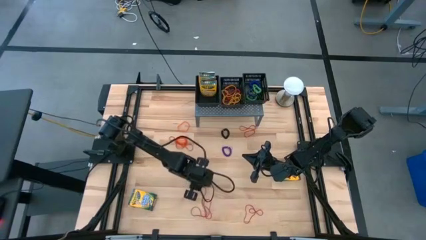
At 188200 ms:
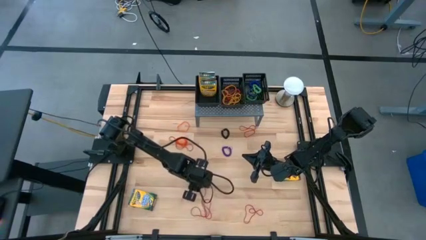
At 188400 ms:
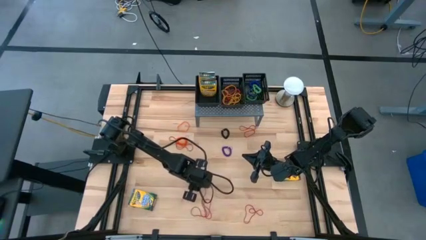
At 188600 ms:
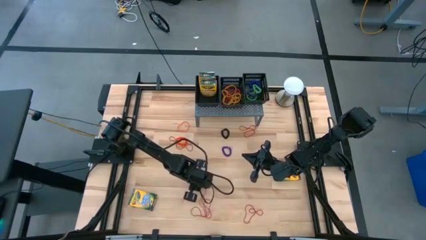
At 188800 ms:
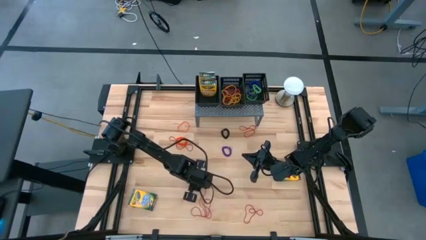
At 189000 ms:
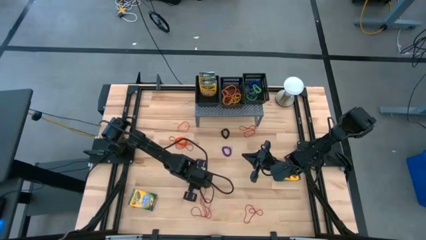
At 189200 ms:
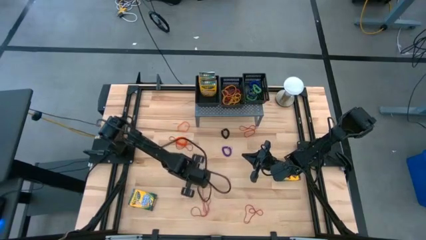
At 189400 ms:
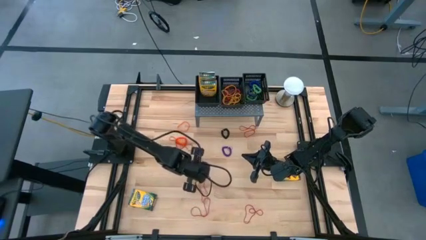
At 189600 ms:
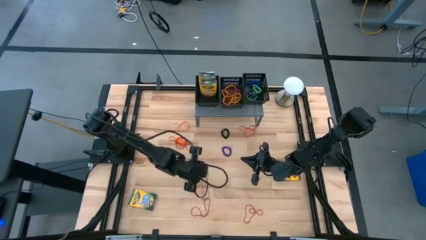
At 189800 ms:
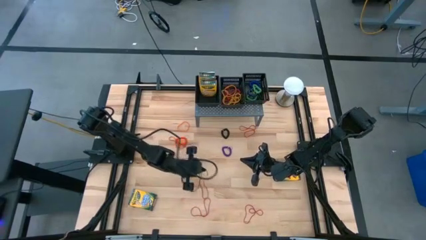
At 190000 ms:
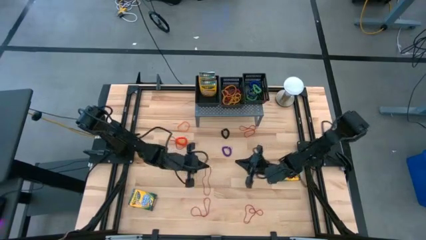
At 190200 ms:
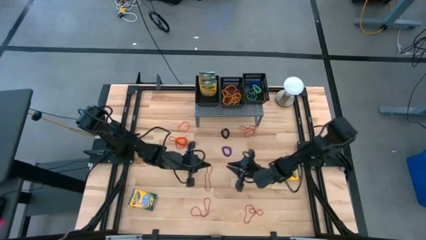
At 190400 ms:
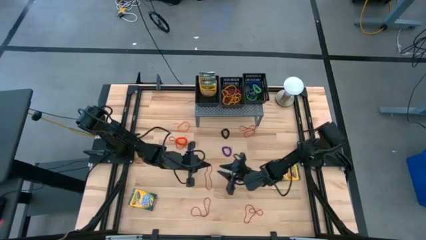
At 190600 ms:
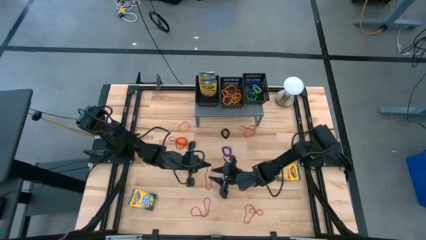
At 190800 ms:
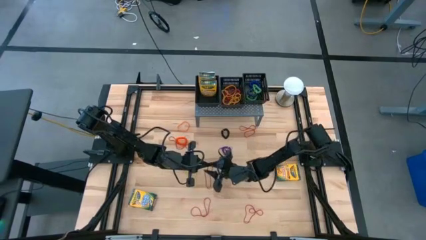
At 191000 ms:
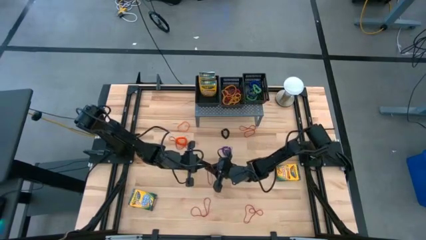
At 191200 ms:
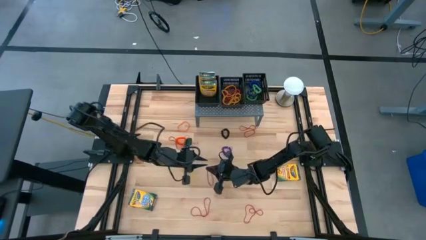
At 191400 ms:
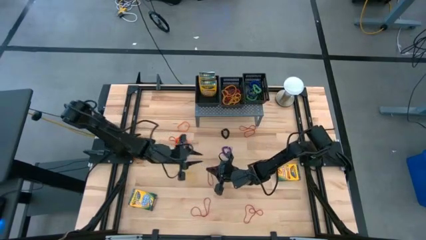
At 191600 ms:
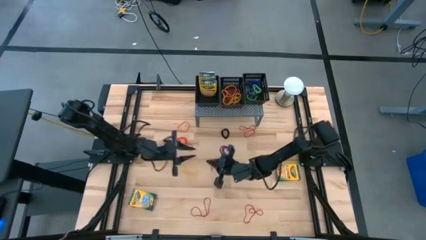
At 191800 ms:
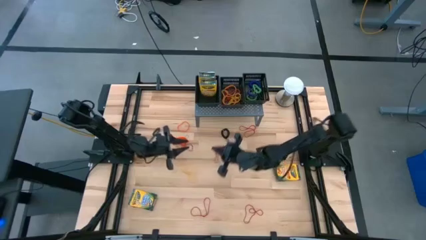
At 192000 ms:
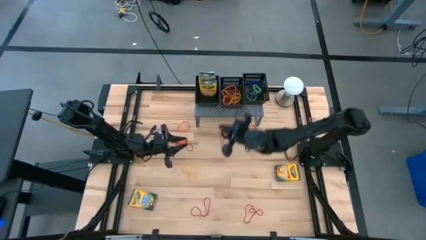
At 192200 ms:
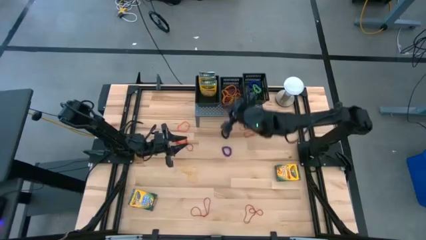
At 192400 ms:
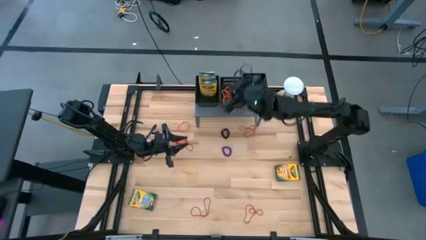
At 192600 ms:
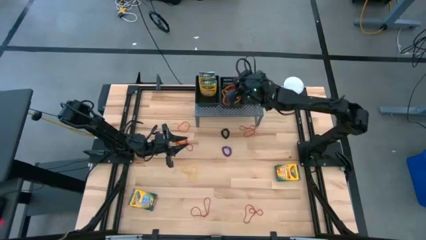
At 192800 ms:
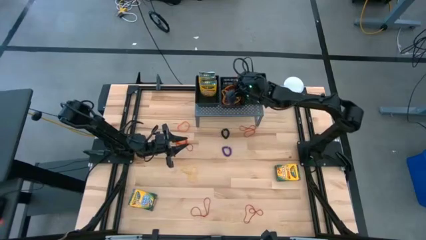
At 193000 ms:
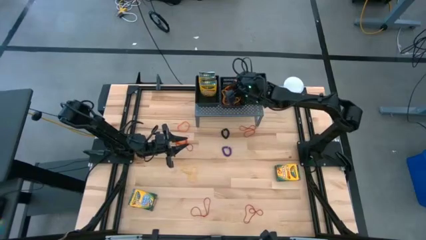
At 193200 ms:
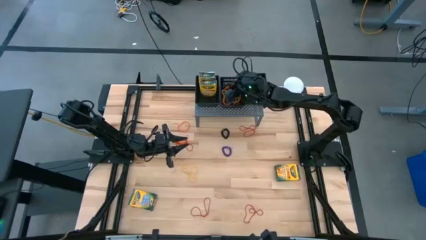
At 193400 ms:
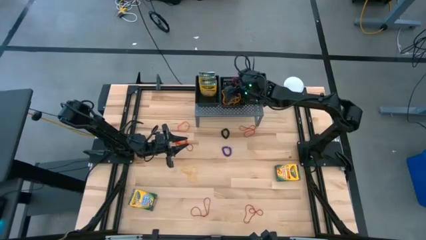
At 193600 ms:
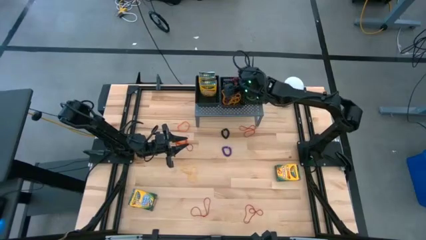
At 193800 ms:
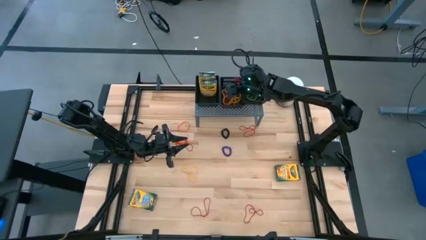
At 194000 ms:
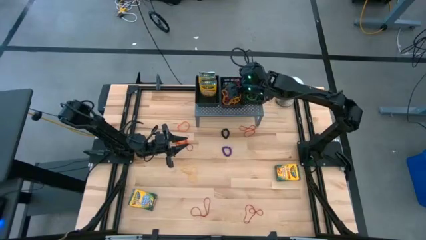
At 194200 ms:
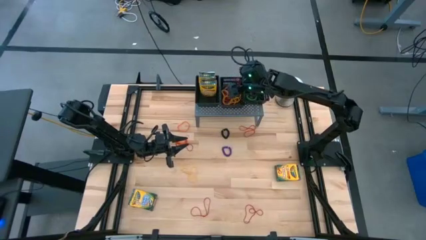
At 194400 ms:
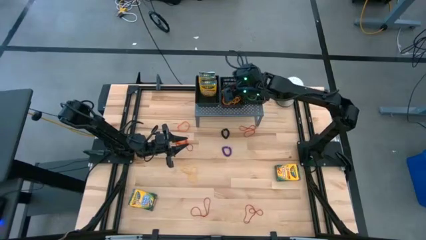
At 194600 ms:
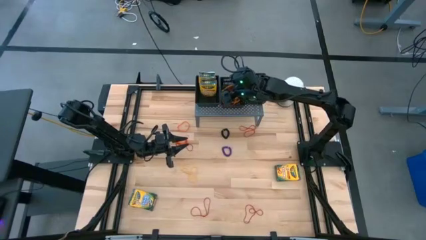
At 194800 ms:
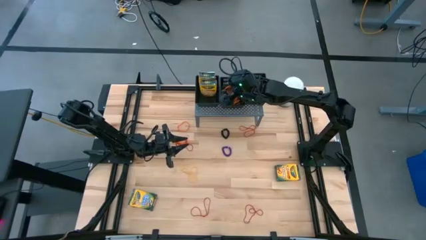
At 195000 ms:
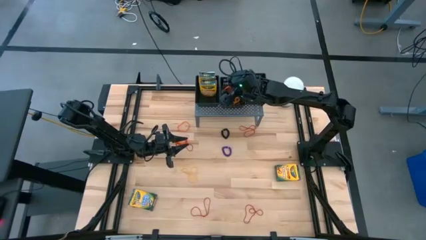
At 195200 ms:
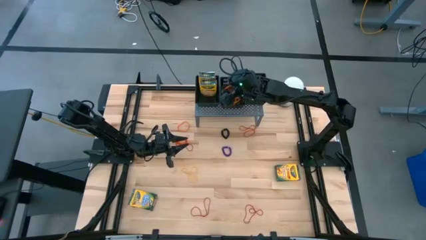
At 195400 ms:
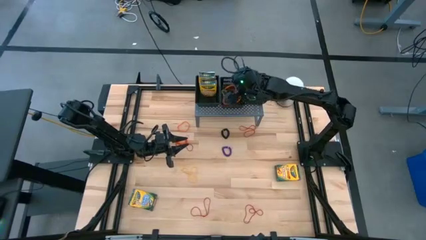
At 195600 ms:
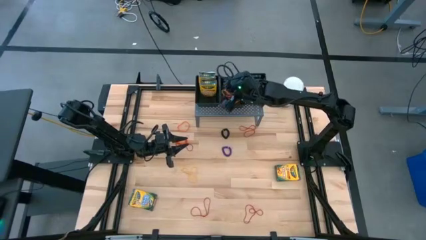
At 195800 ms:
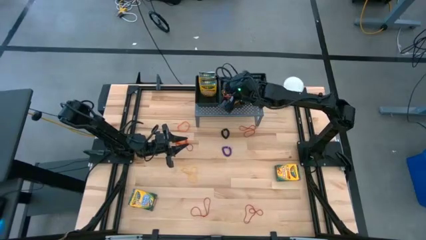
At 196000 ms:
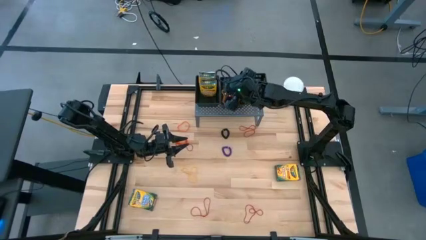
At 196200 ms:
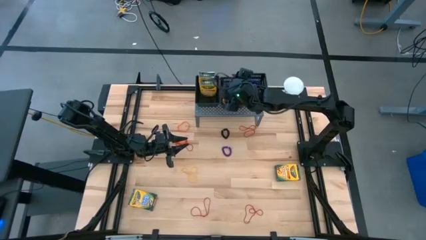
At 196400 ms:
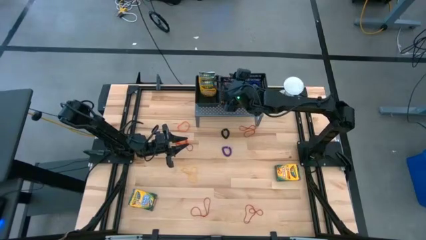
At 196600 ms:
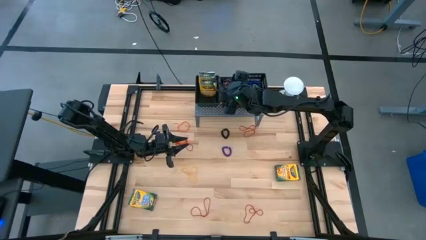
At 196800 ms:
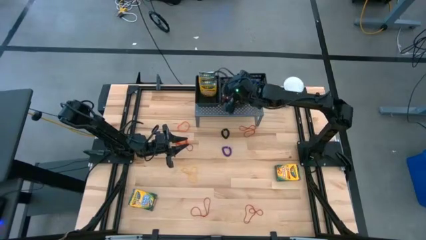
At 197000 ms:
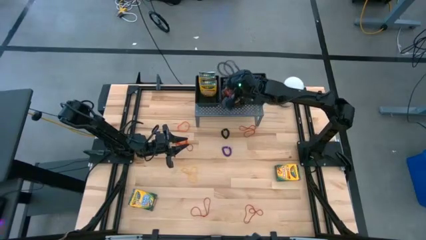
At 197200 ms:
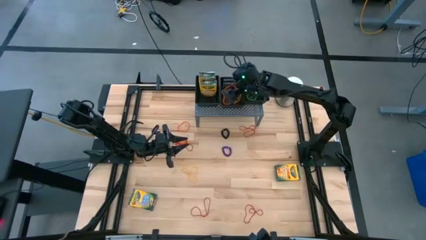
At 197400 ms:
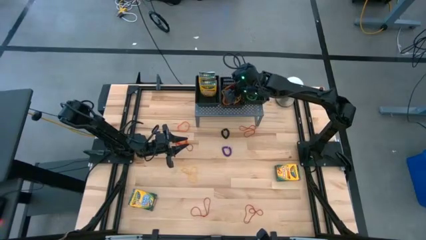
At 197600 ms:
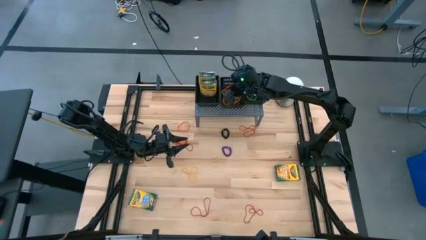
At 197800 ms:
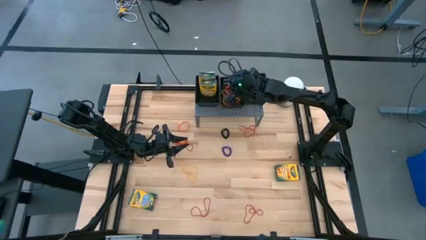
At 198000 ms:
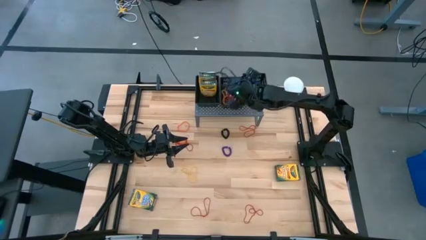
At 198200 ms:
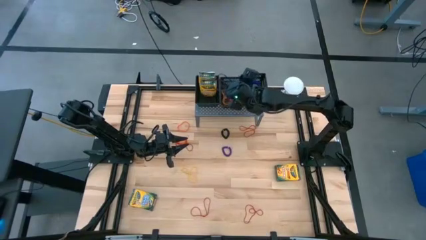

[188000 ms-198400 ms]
Task: Sort rubber bands into baskets
Put the red rubber band into the middle black basket on the shelf

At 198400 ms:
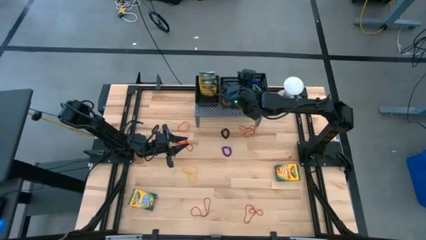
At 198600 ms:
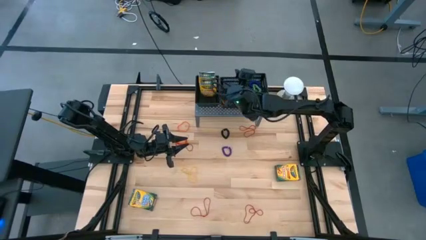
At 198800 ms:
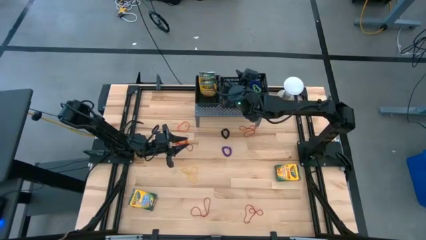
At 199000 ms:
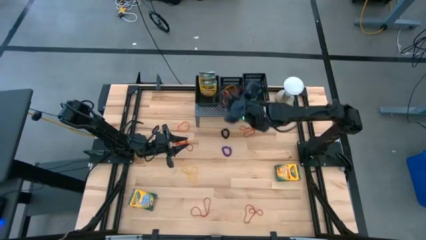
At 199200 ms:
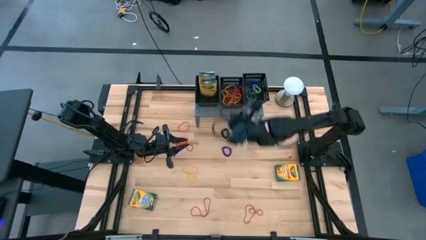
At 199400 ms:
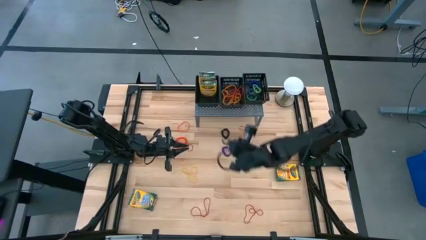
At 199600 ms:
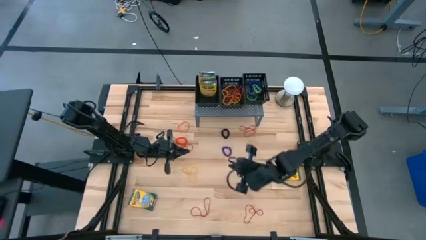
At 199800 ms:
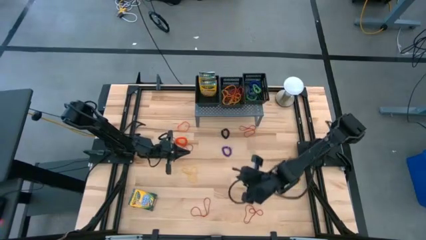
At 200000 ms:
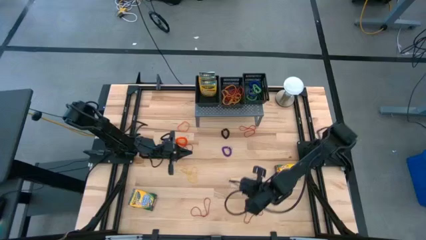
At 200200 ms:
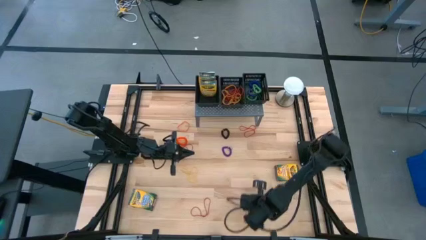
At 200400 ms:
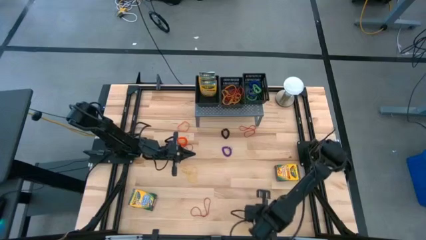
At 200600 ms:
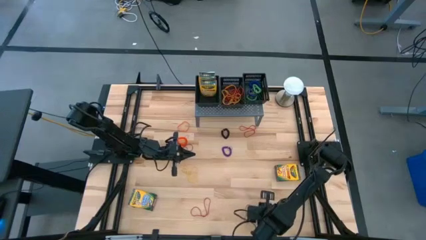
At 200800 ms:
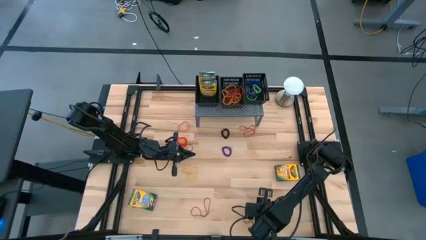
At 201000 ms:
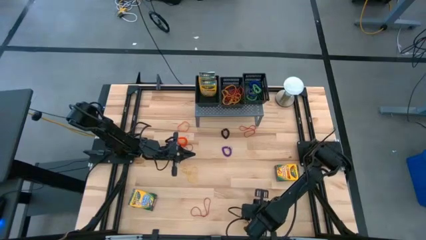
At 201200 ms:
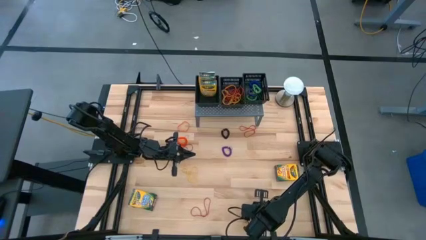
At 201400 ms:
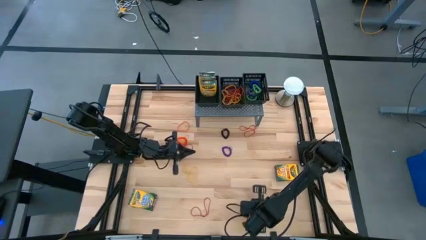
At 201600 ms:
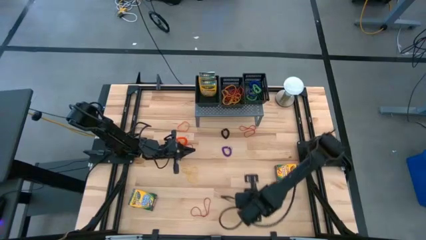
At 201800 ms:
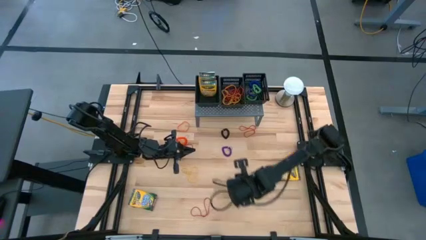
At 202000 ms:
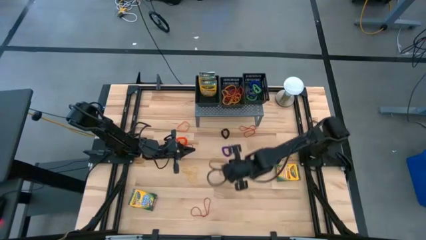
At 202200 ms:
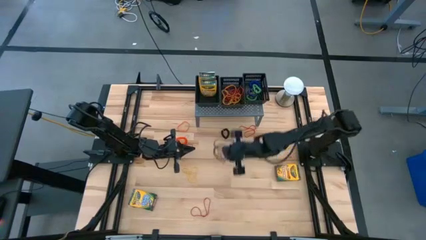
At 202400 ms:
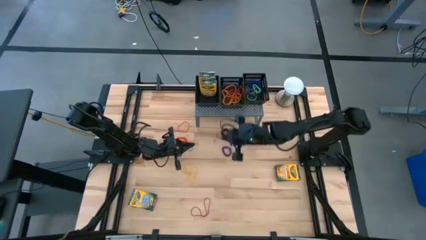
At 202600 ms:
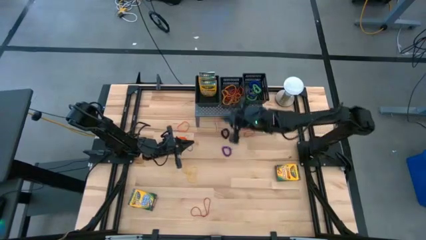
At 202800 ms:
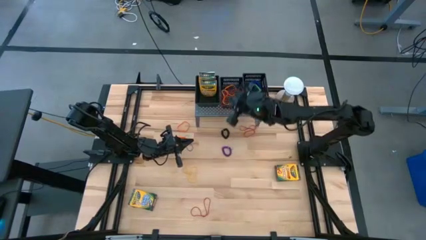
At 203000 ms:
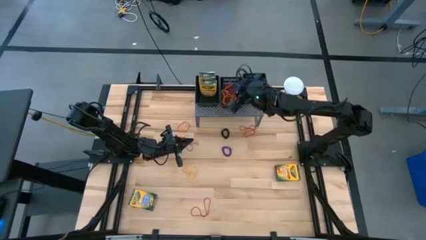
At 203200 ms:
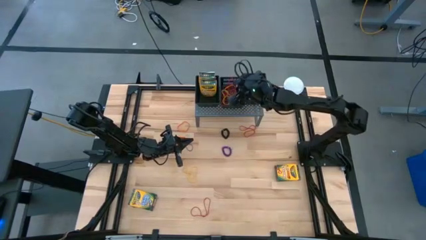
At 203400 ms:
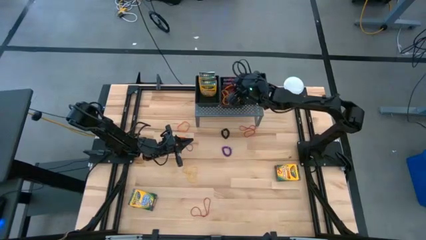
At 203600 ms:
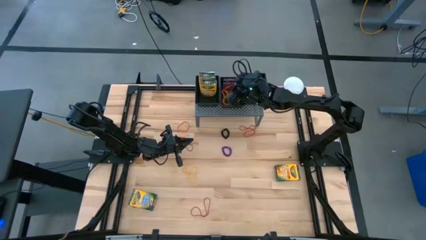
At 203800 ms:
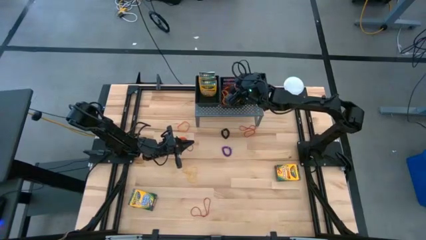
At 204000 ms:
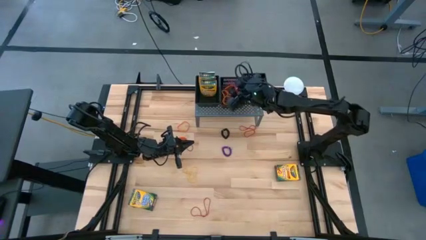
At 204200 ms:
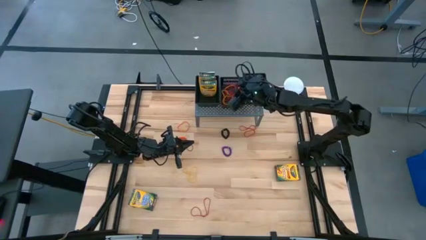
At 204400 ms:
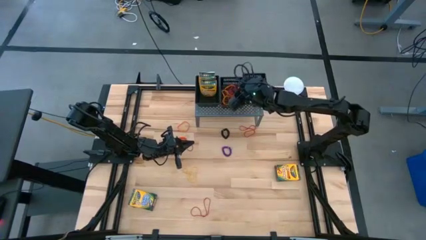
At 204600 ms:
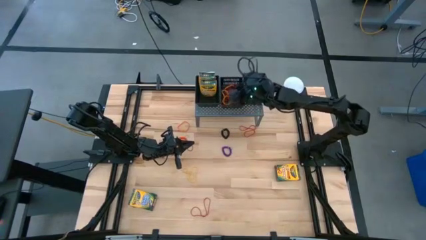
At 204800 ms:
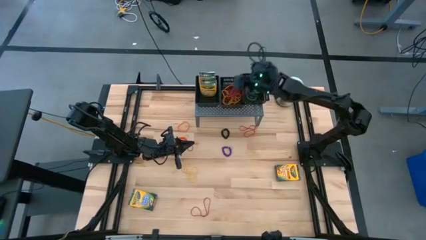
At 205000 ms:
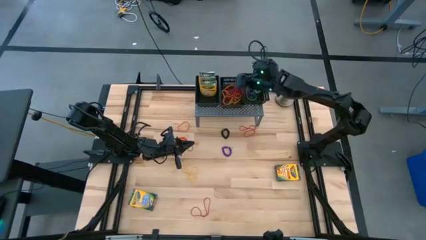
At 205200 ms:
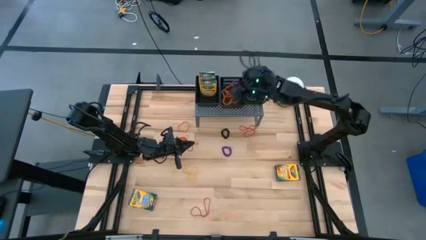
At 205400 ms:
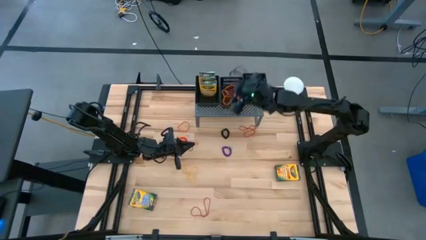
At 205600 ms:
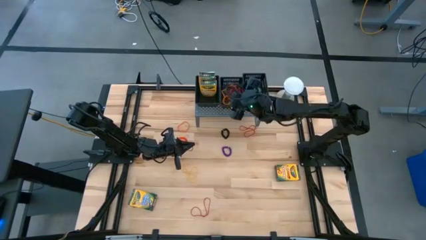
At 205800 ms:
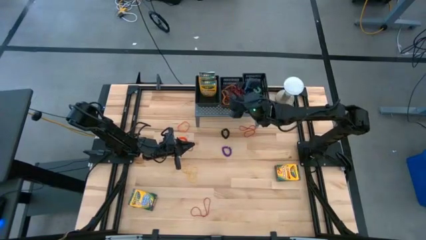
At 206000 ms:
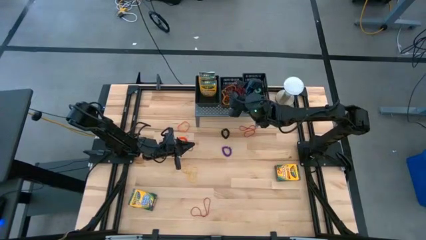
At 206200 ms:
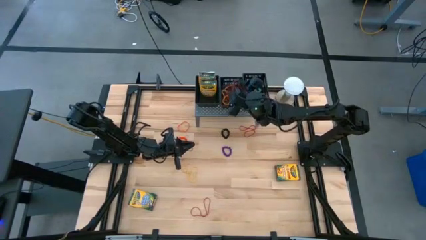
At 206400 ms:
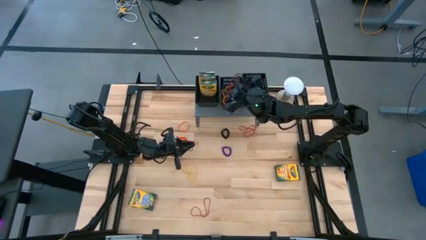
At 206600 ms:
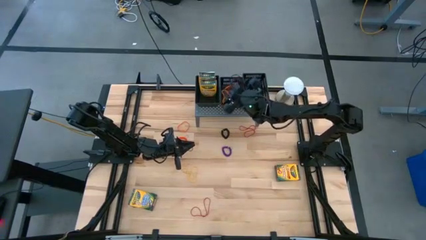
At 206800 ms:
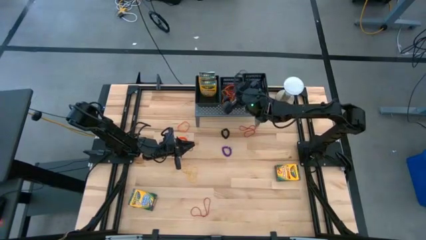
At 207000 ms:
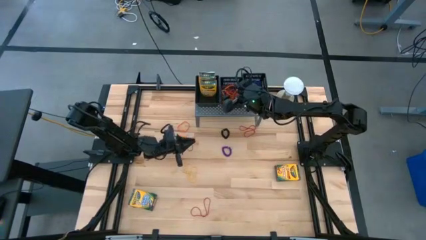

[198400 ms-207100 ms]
Put the red rubber band into the middle black basket on the shelf
